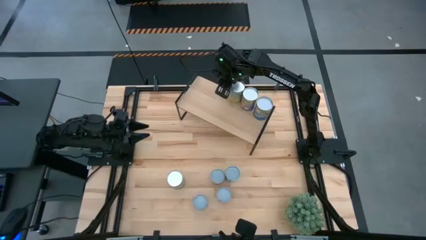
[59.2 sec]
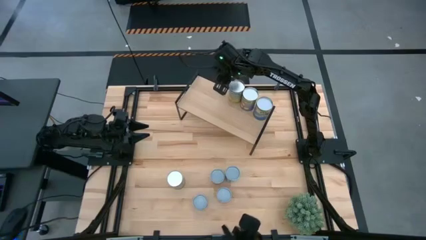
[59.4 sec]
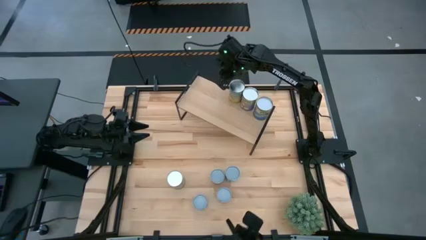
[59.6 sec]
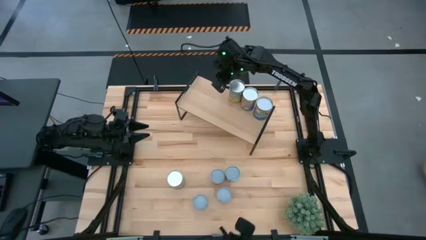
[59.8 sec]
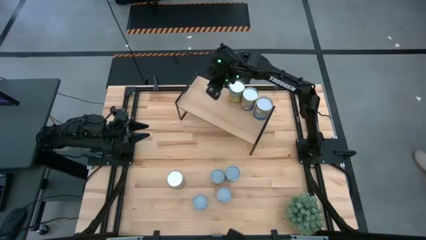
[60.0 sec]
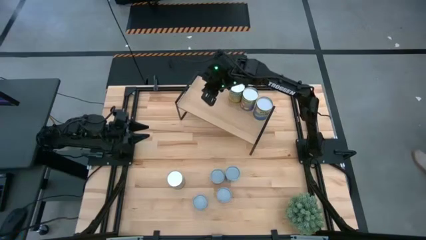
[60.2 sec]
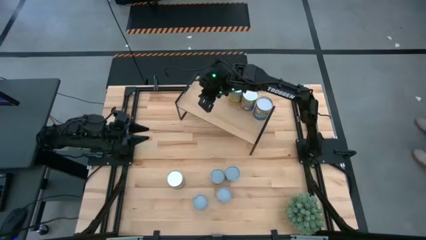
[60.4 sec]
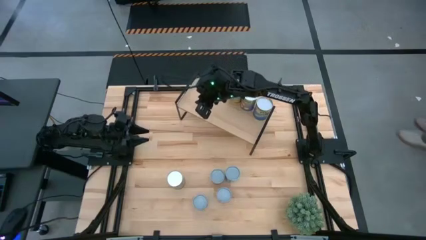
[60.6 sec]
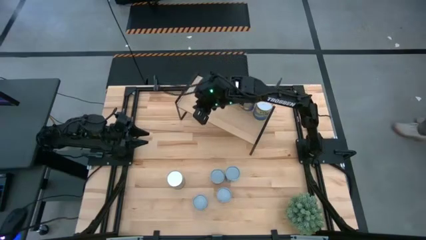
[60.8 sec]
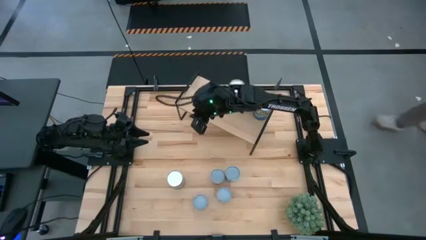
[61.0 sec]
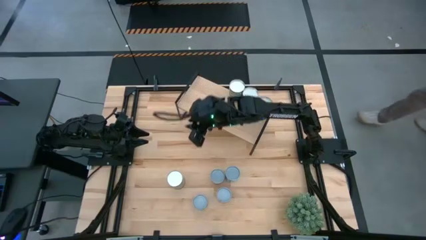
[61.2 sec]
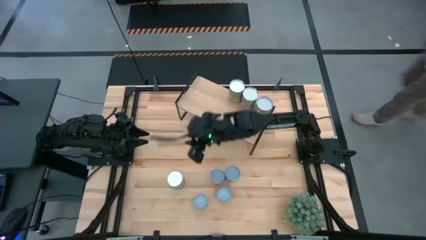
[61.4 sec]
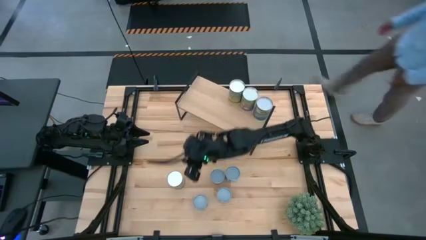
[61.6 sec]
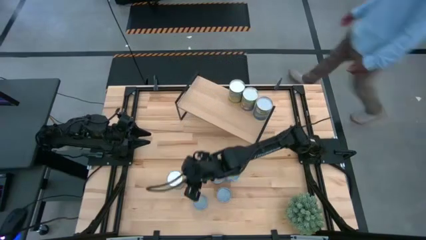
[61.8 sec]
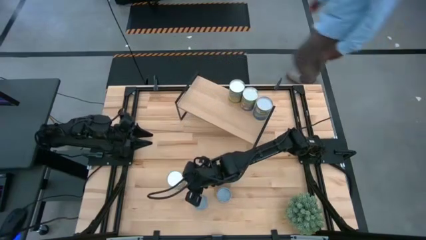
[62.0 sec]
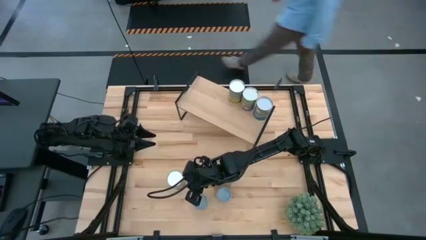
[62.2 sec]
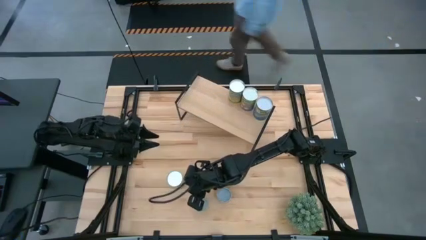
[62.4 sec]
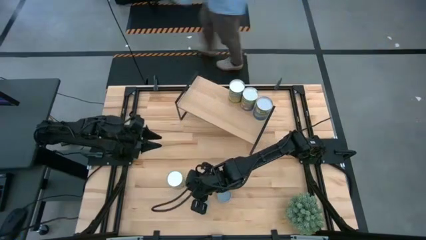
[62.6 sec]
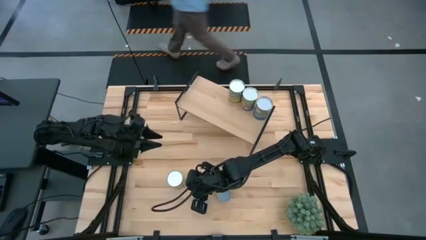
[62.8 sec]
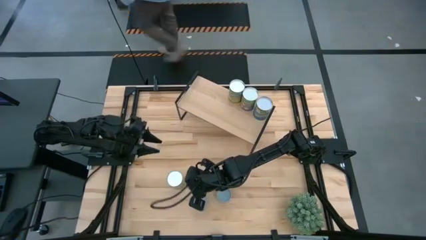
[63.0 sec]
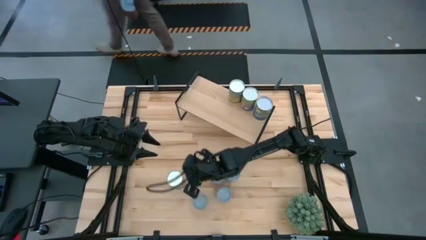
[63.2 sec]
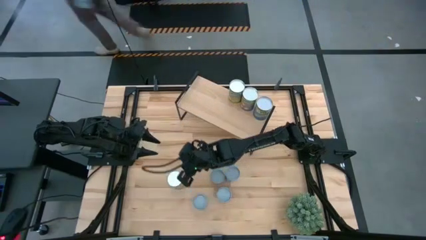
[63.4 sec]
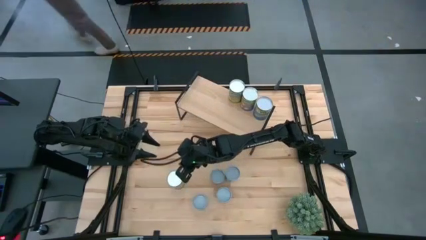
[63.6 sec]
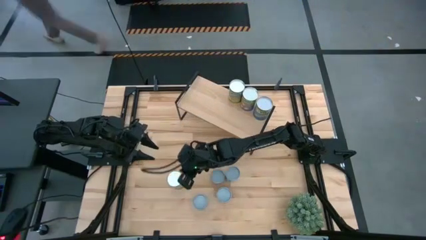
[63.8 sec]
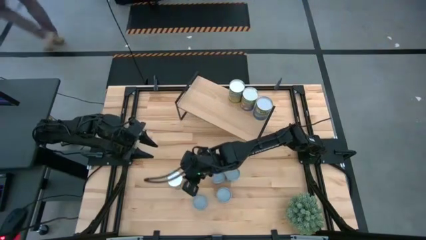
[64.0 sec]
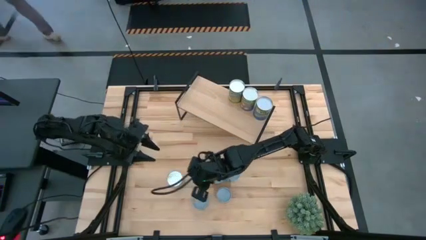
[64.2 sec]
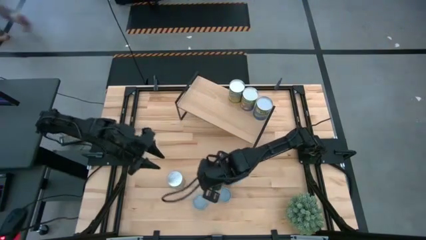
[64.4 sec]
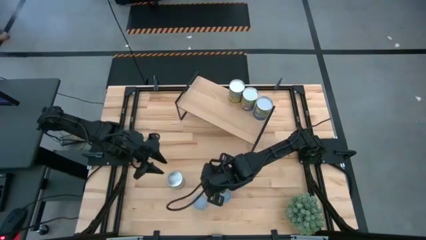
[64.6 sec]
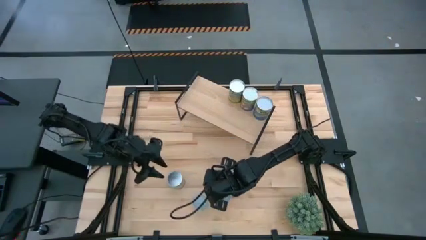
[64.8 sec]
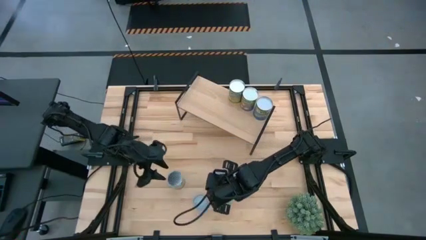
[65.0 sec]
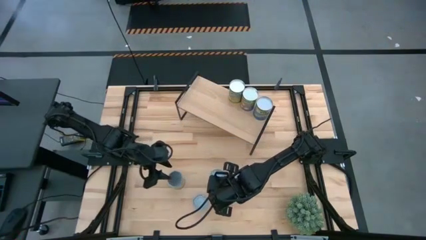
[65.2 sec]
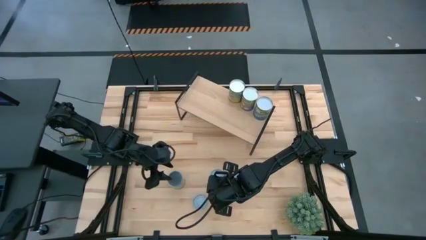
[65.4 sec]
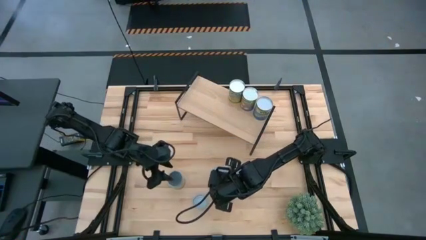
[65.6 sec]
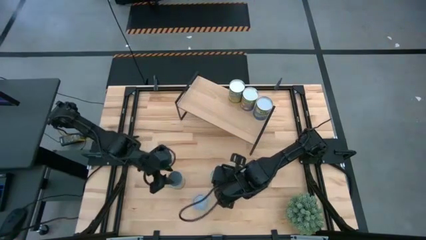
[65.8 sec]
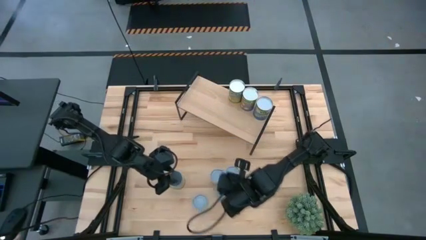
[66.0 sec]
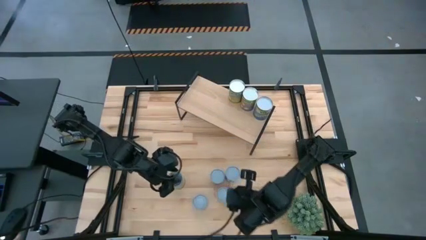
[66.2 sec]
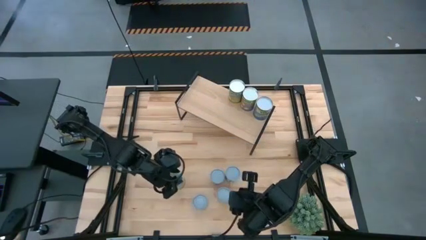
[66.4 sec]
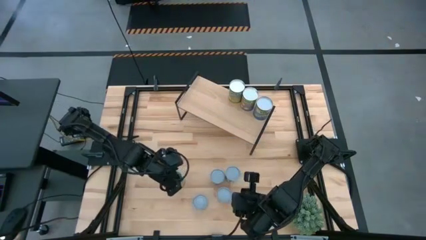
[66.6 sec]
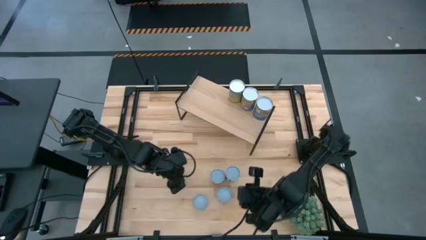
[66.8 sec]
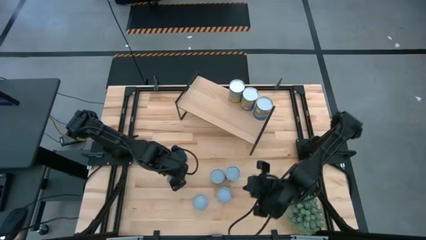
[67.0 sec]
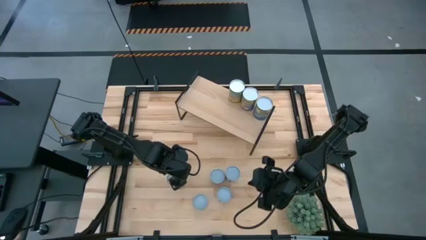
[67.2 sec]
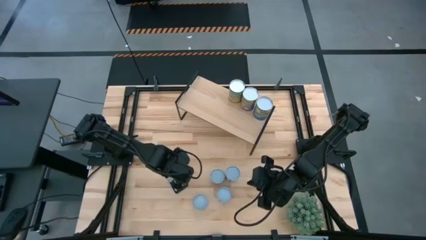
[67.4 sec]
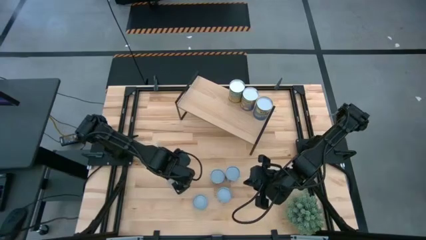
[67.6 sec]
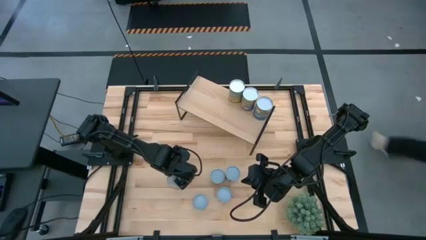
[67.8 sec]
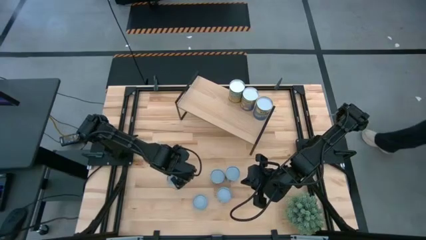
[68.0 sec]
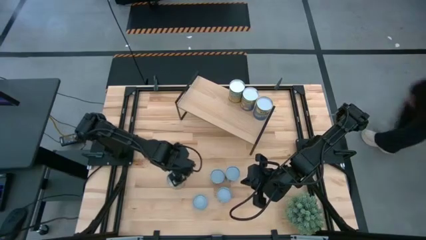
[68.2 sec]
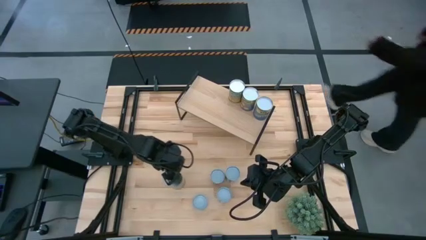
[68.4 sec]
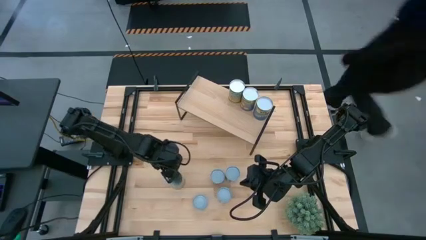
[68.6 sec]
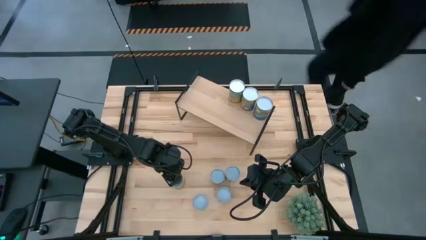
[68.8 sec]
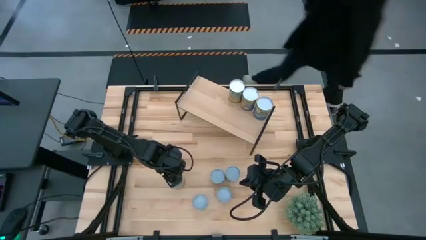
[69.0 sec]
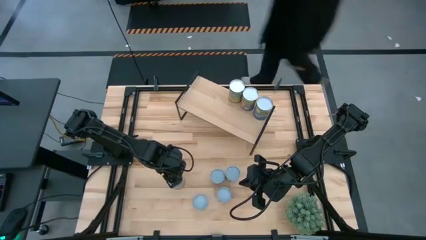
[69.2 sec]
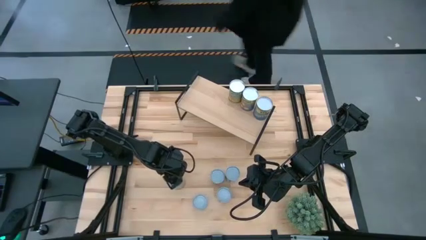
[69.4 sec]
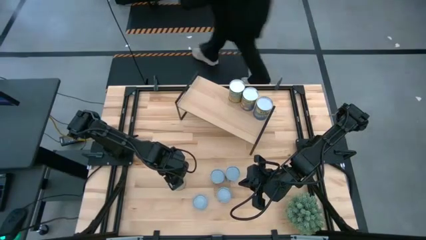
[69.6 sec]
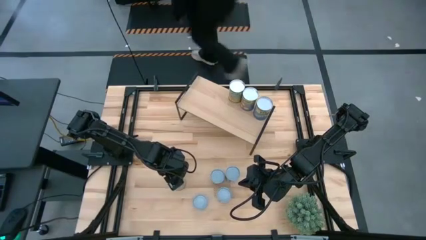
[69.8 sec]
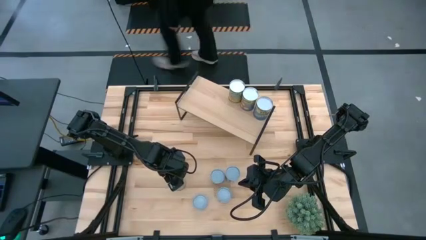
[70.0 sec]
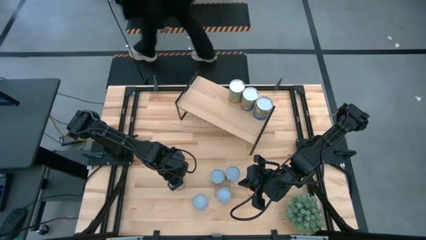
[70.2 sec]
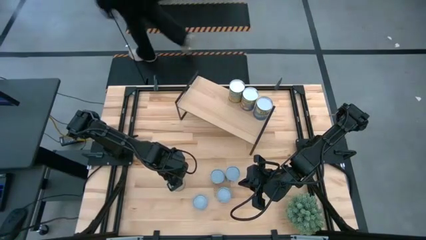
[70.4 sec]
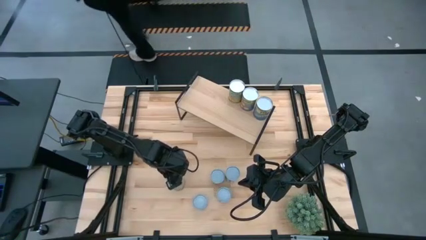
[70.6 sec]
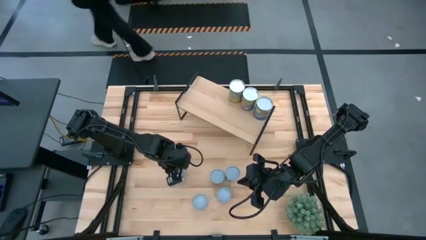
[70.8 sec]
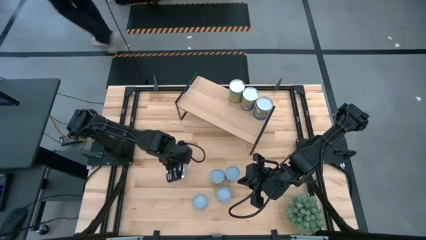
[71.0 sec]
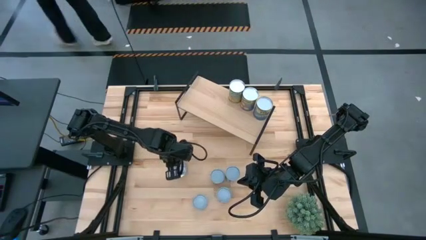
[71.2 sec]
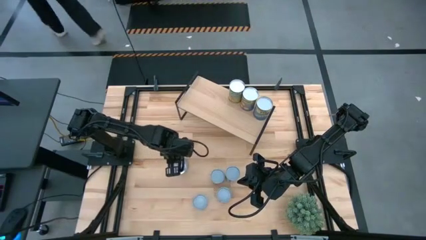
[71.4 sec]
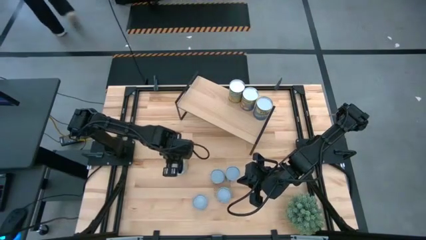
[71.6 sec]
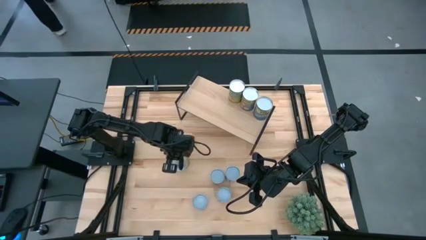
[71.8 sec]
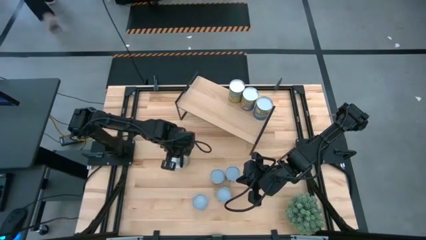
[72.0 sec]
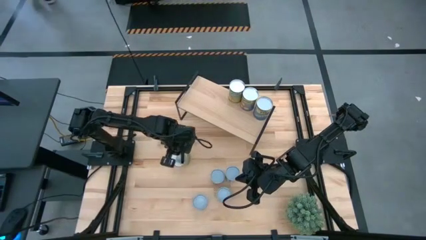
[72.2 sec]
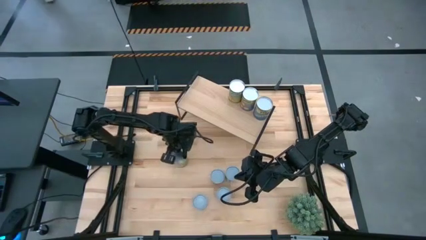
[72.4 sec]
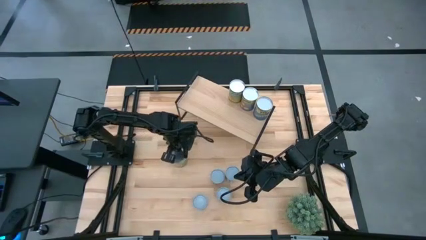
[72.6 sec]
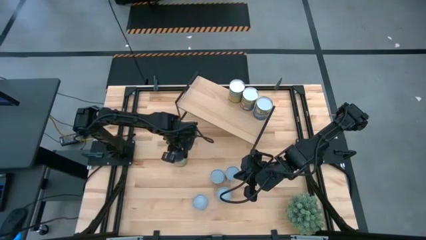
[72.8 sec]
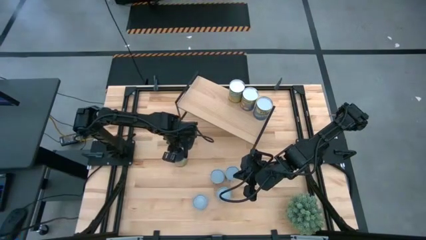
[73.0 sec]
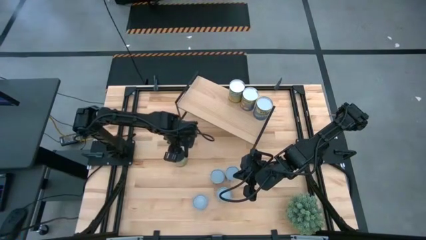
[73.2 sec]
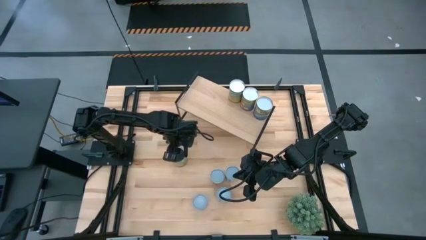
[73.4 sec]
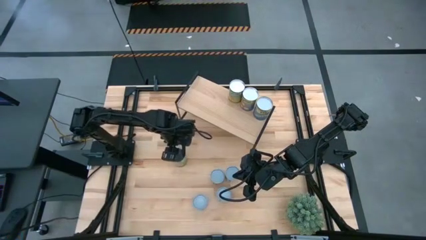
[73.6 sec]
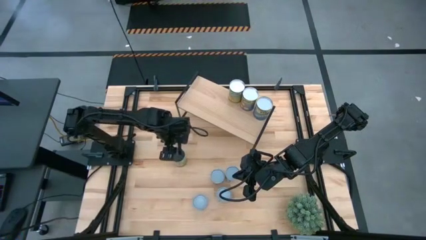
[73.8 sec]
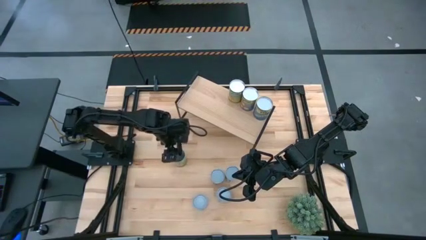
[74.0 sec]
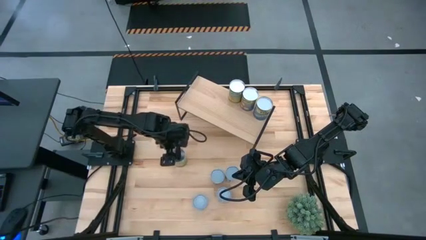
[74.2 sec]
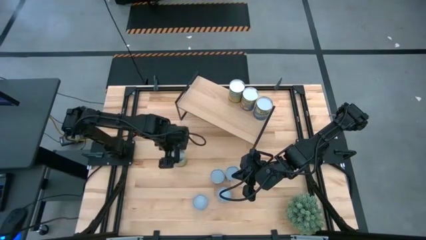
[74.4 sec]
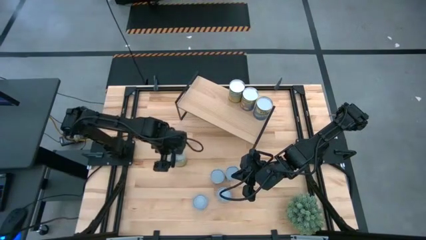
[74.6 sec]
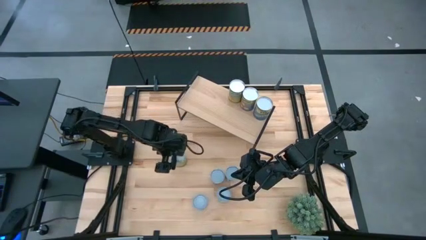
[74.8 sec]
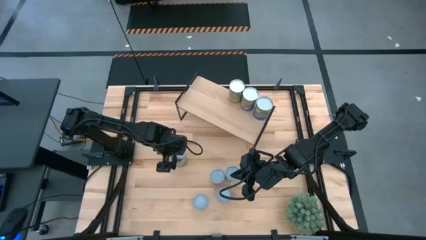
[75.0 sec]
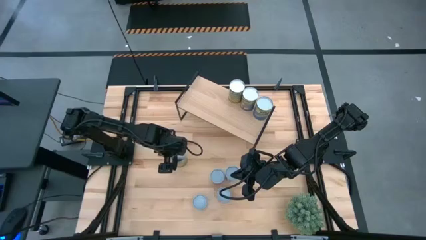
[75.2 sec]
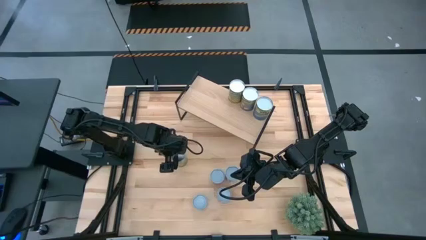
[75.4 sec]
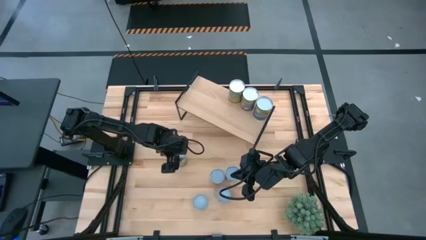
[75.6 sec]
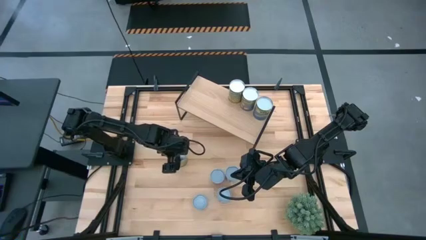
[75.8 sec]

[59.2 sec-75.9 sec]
Task: Pick and place cans onto a shelf
Put the canned oranges on the shelf
